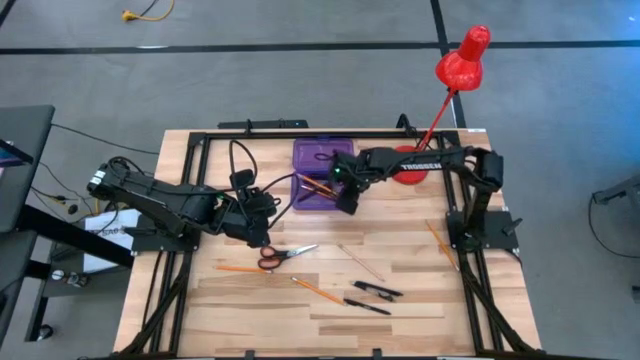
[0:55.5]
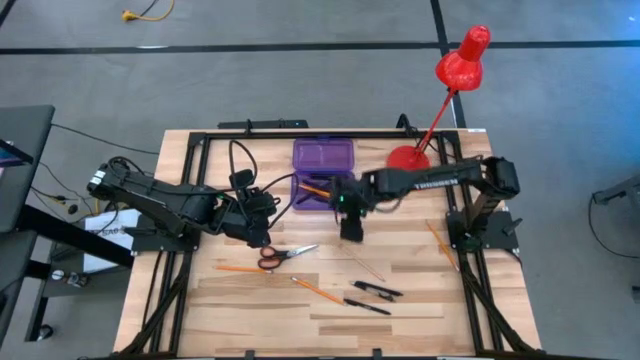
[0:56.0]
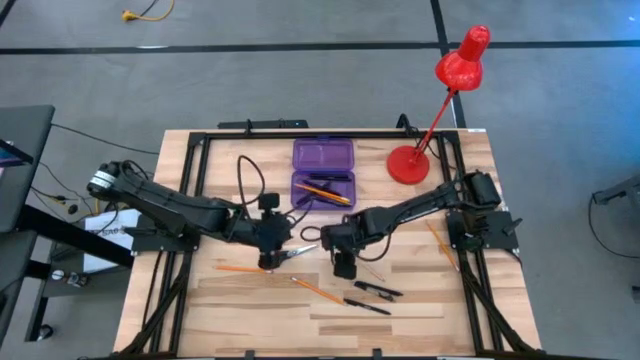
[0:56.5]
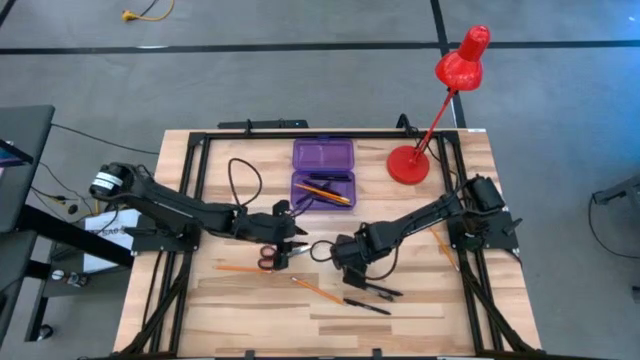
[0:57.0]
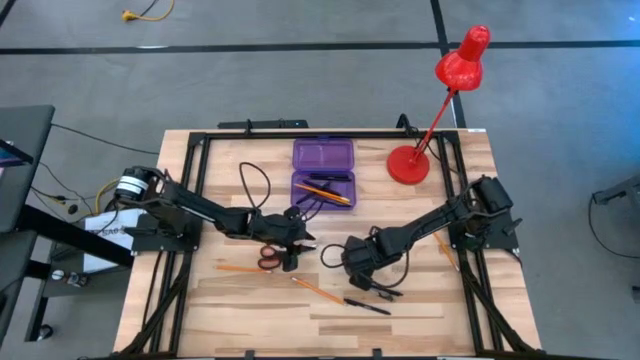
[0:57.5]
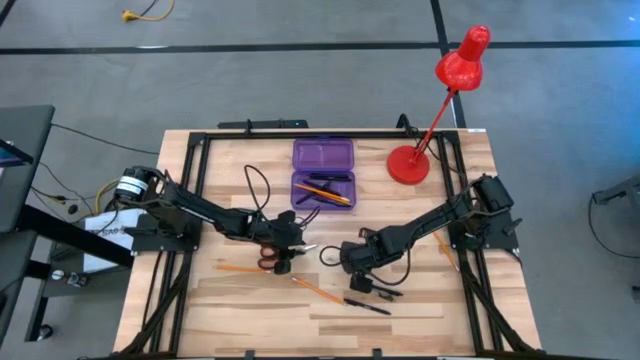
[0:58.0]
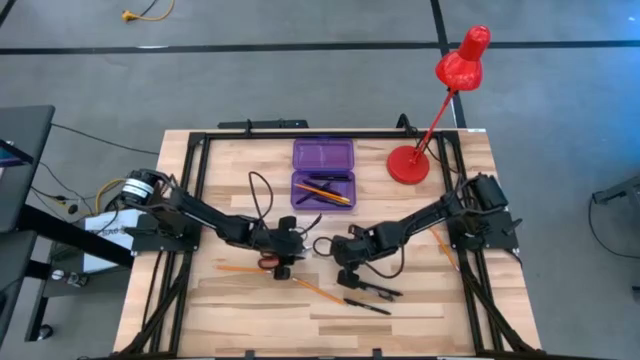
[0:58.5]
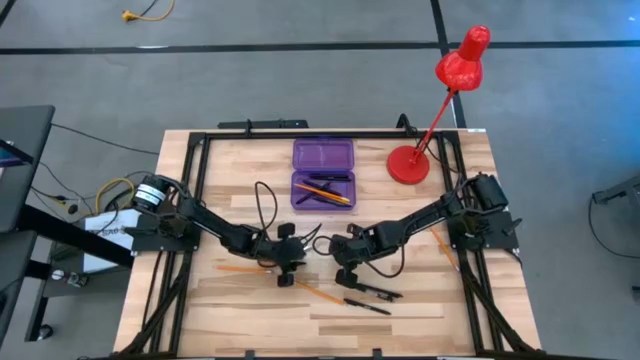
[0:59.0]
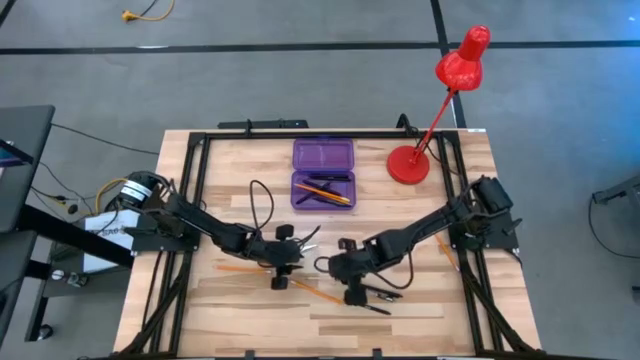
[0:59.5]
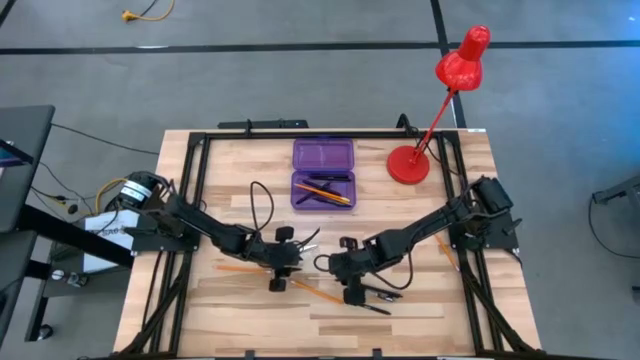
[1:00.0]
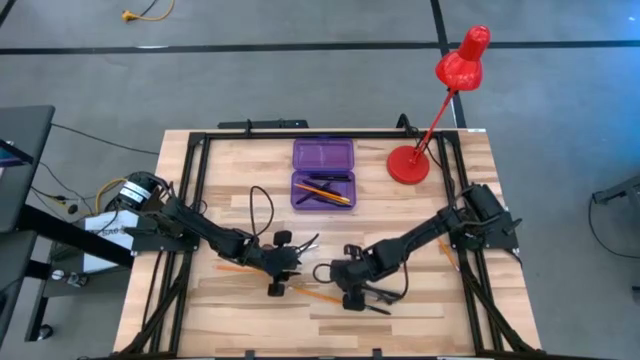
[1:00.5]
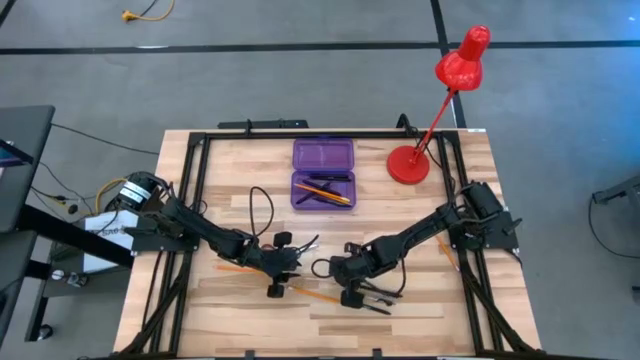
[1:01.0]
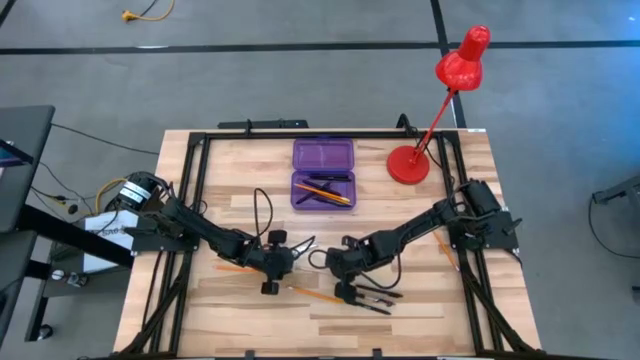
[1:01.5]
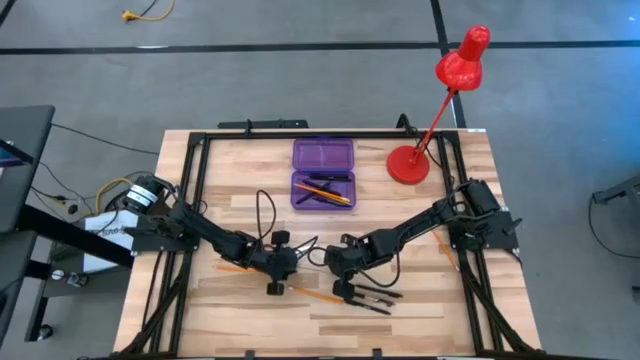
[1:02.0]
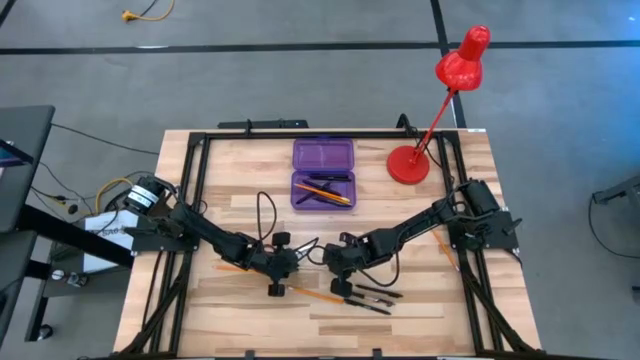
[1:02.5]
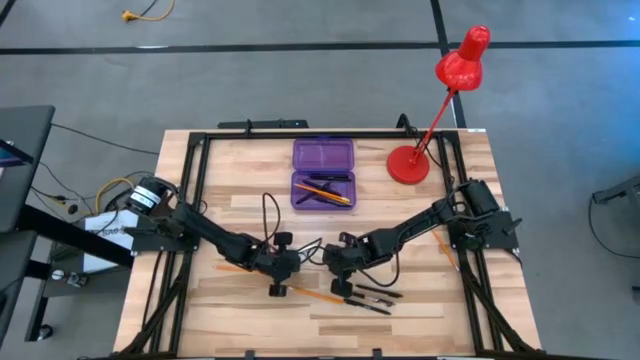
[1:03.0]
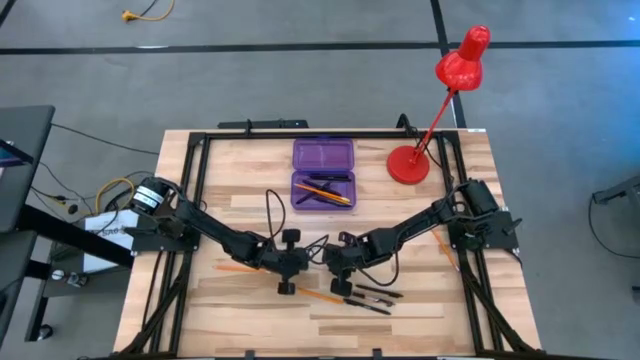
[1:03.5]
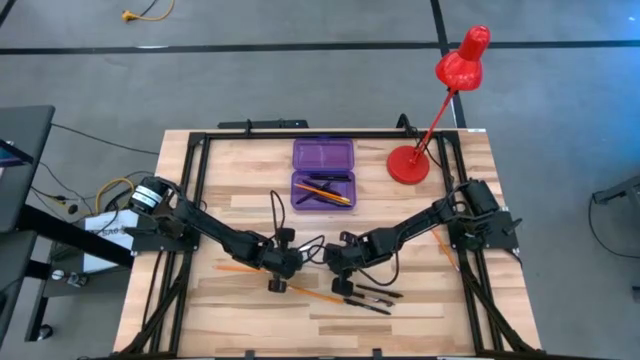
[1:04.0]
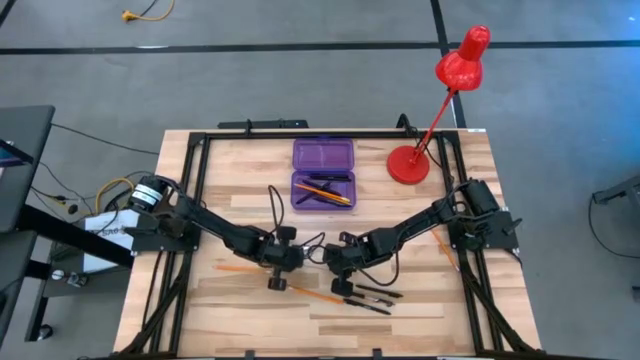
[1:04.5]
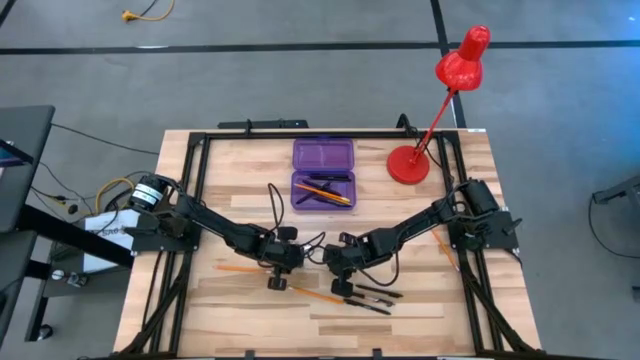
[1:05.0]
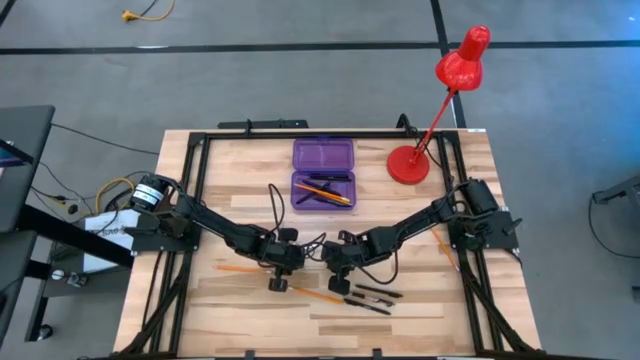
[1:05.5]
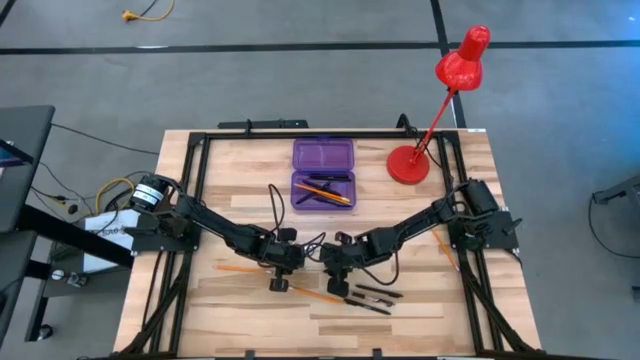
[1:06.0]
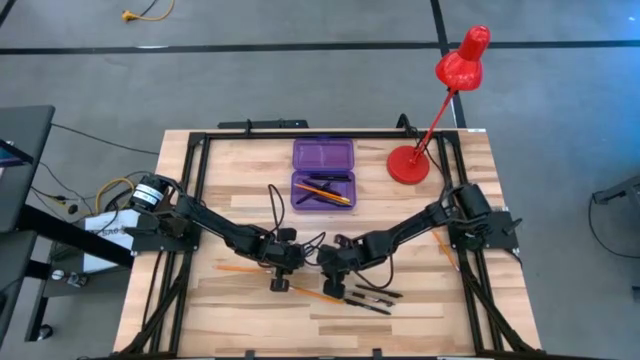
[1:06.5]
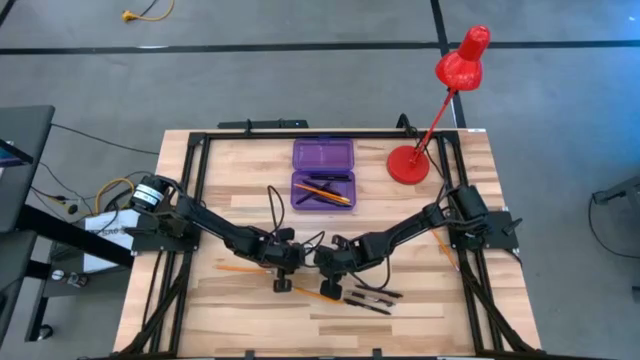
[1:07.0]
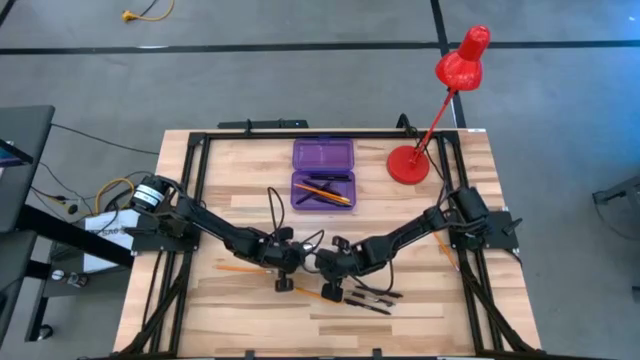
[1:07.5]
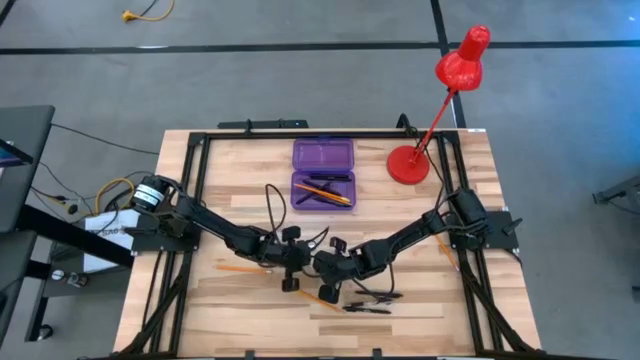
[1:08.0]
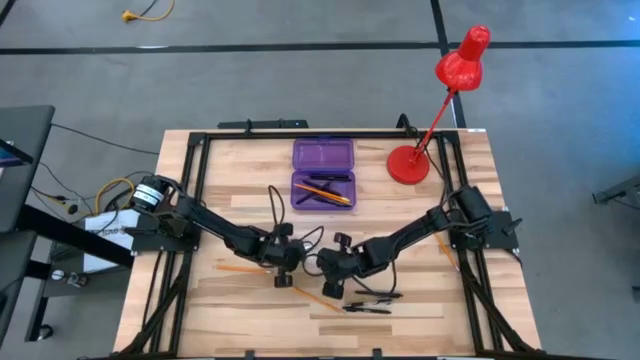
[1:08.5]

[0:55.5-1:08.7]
Task: Pick & place school supplies into a supply box
Put the light brown pencil into the purple supply box

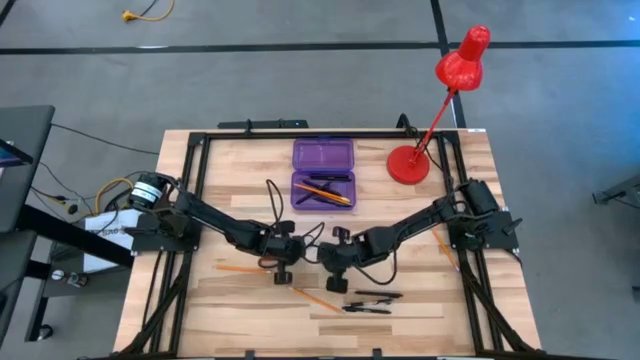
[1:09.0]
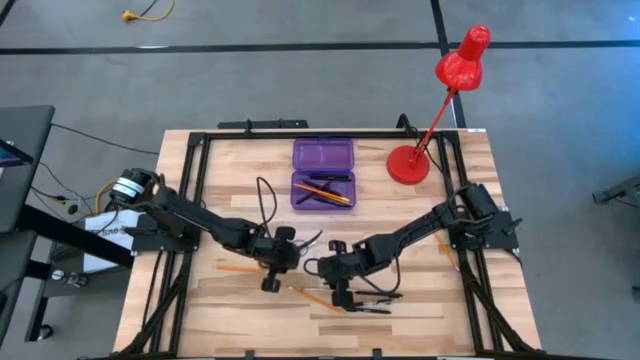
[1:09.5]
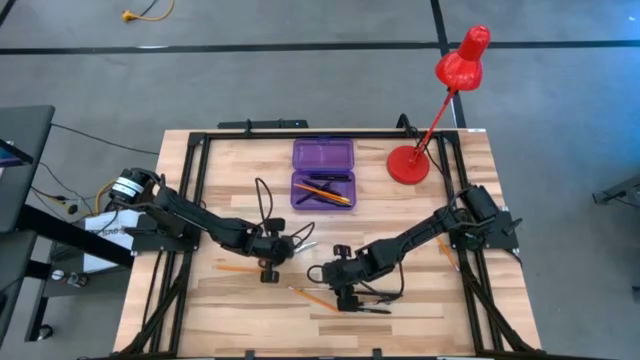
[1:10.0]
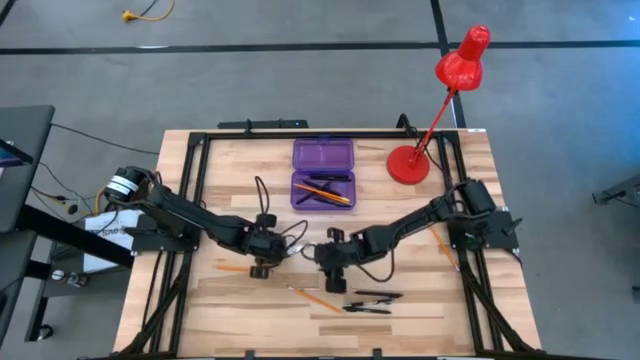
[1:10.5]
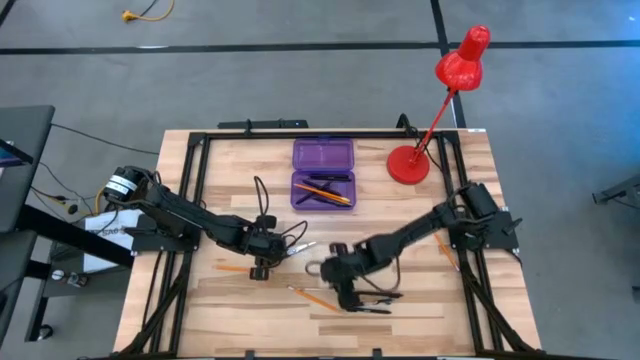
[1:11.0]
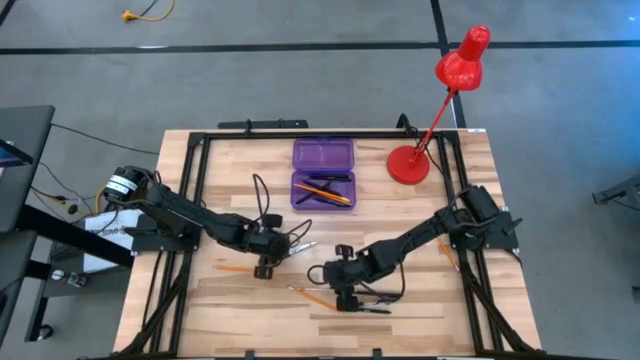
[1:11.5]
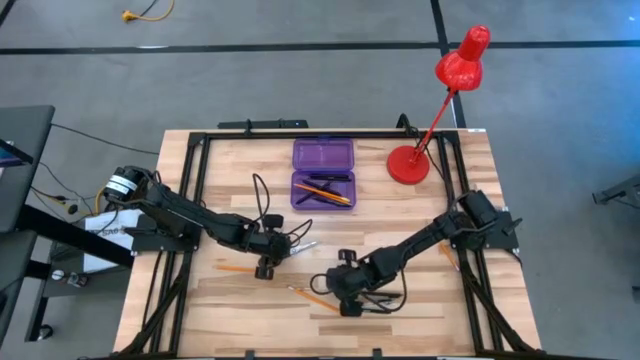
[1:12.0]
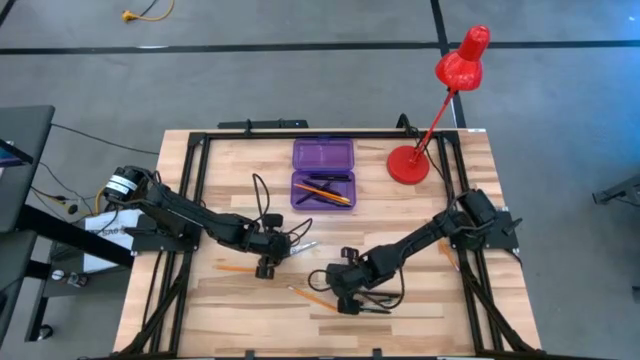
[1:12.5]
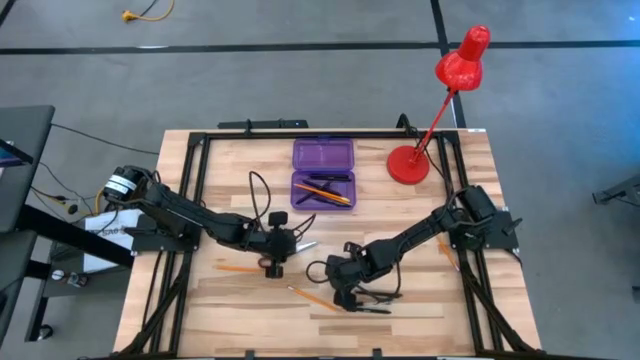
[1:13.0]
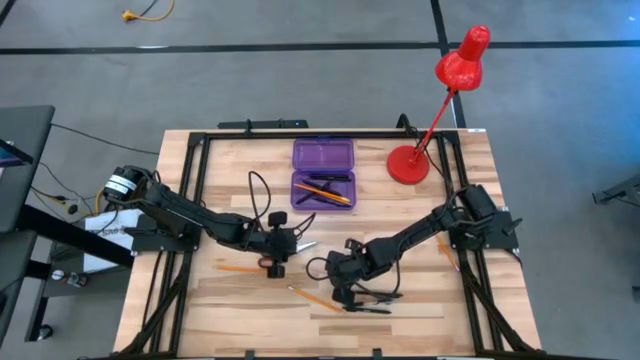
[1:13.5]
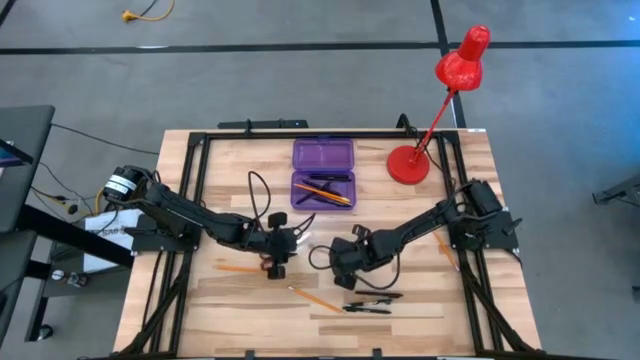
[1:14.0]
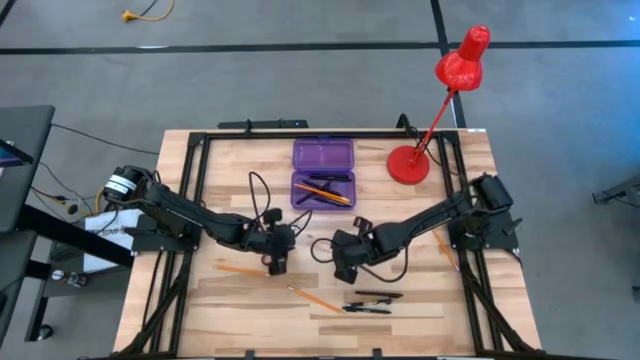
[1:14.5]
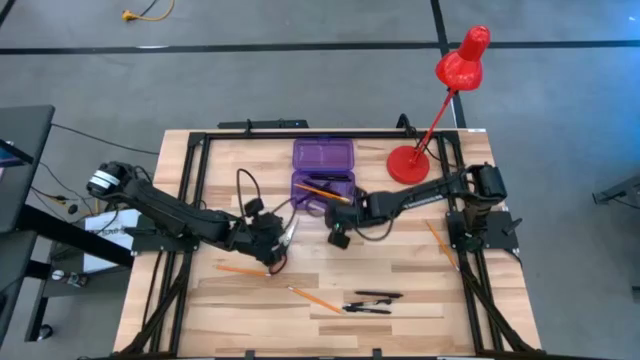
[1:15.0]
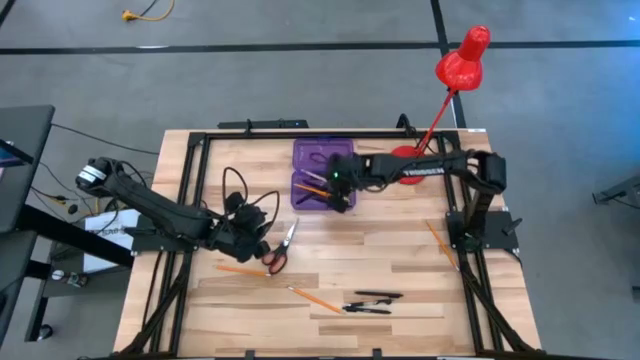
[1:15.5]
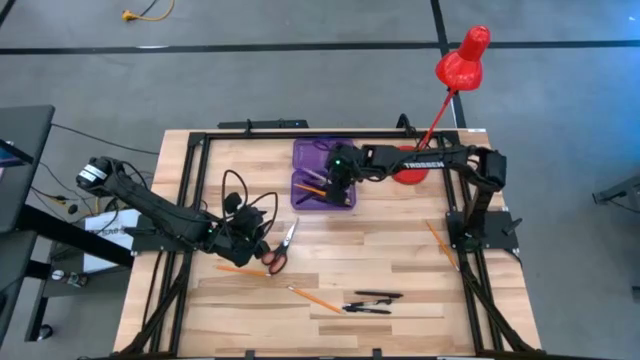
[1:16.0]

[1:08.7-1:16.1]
Put the light brown pencil into the purple supply box
